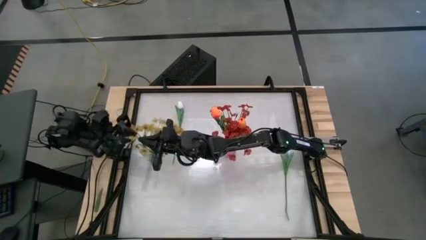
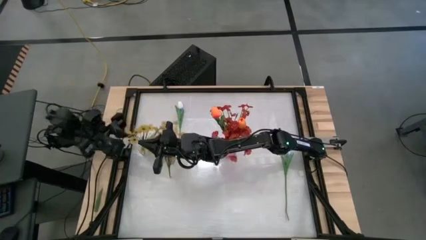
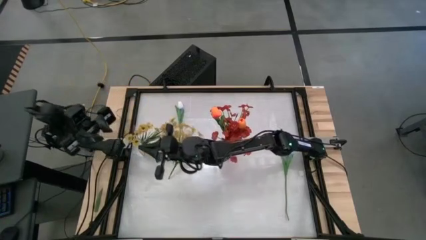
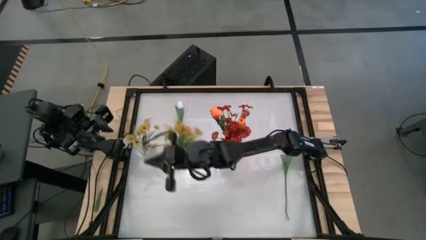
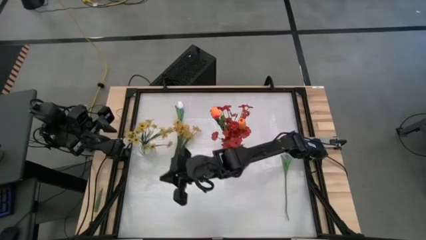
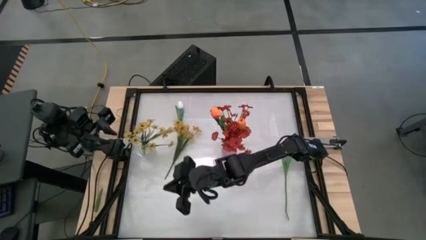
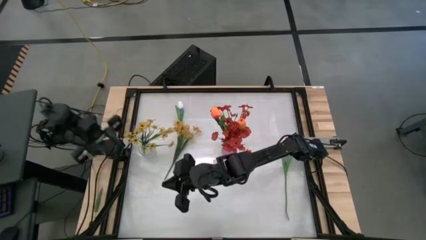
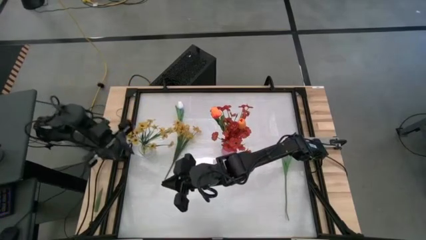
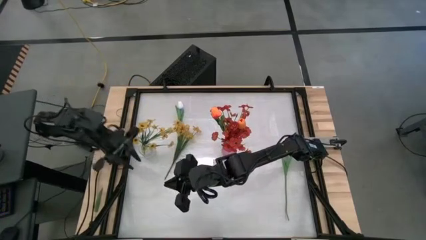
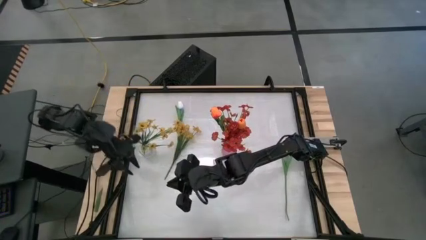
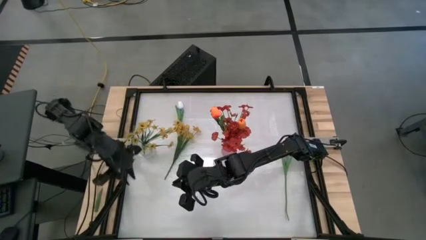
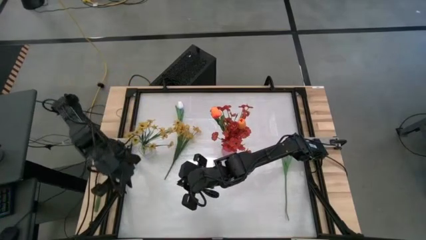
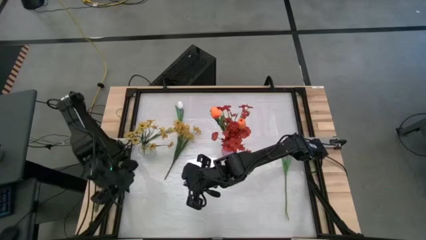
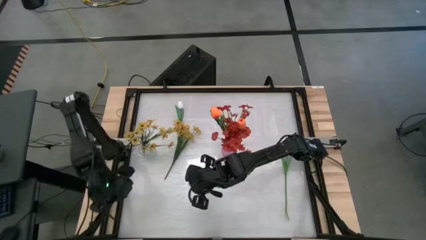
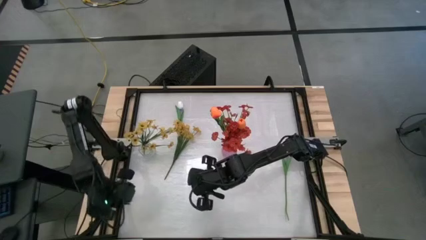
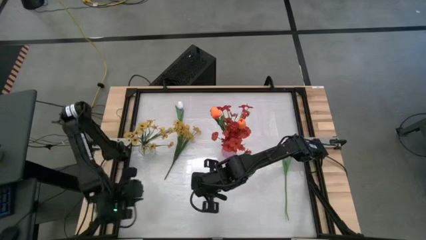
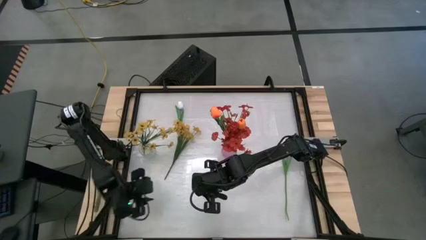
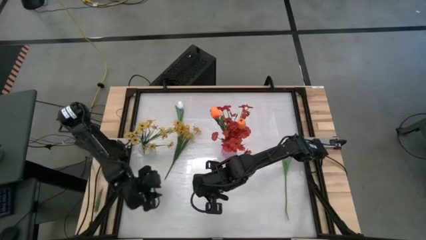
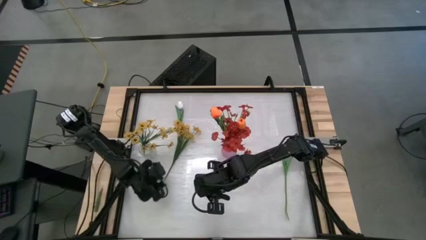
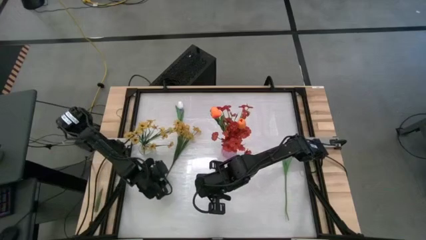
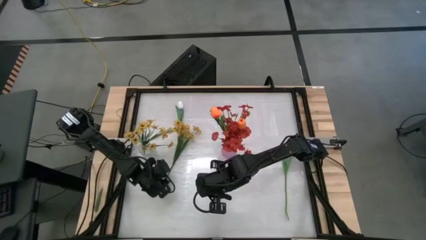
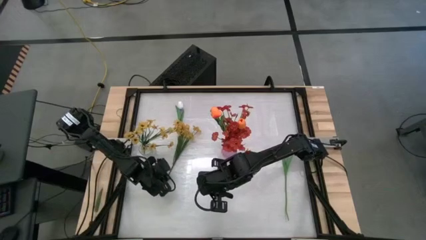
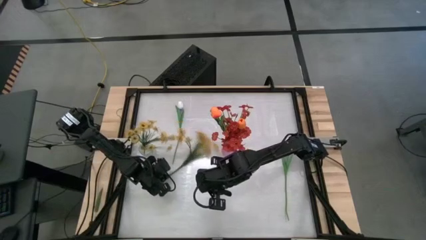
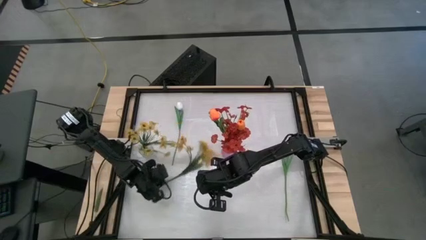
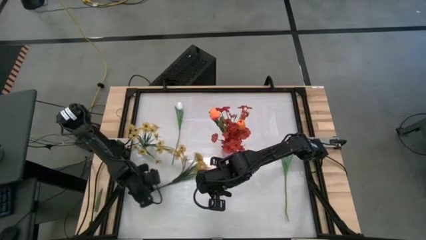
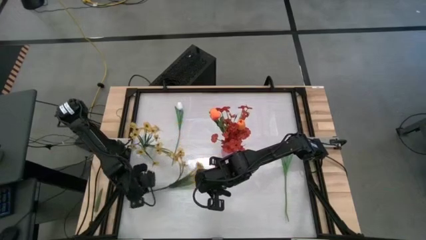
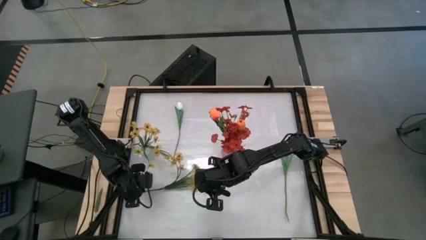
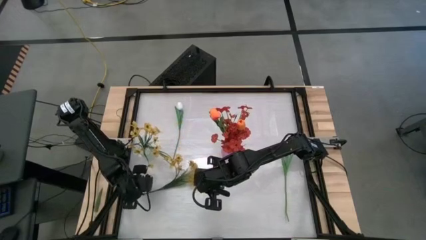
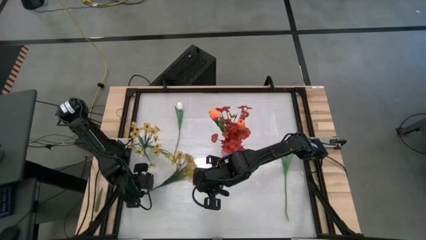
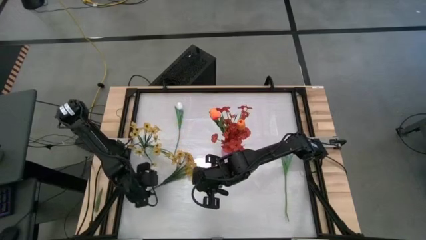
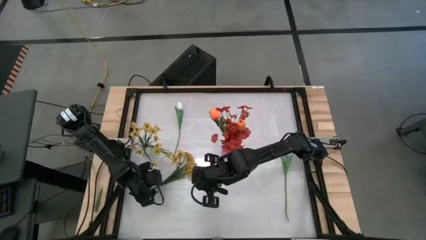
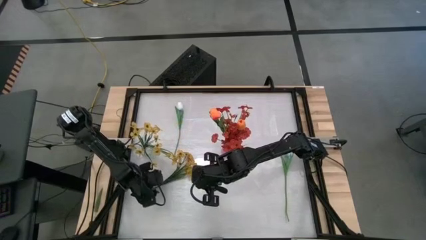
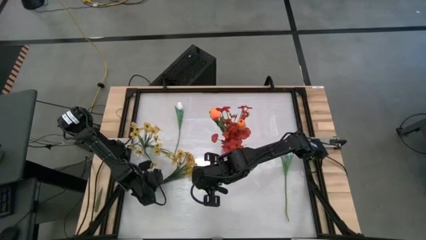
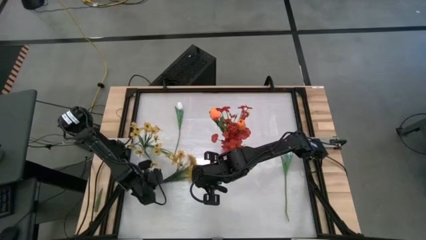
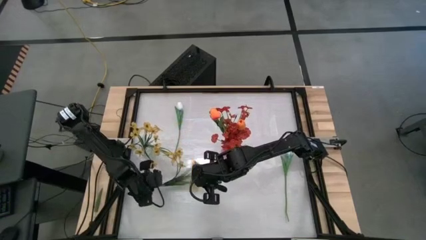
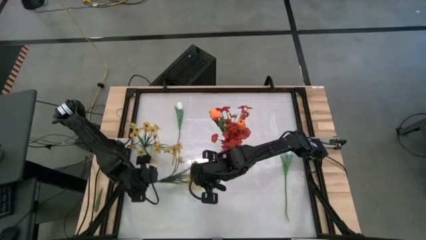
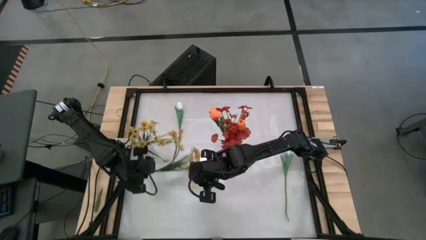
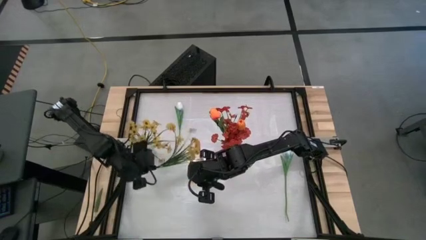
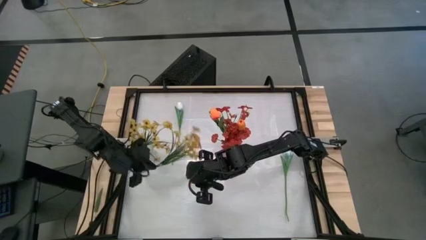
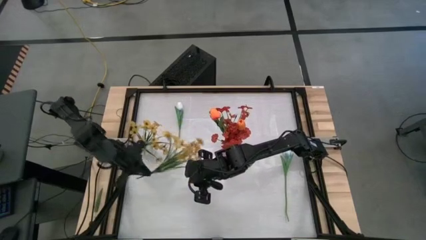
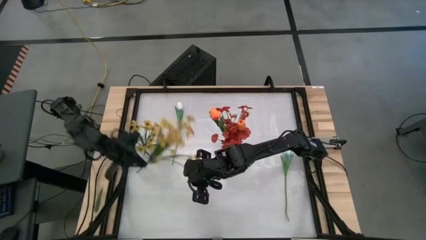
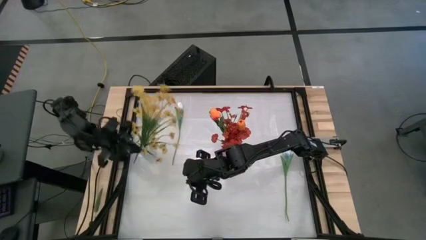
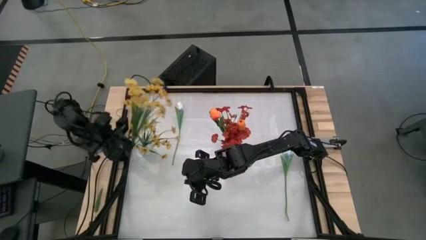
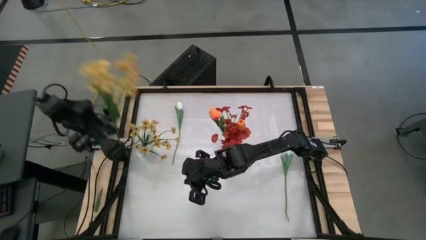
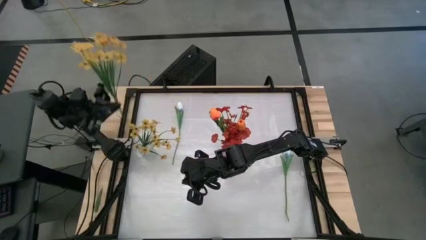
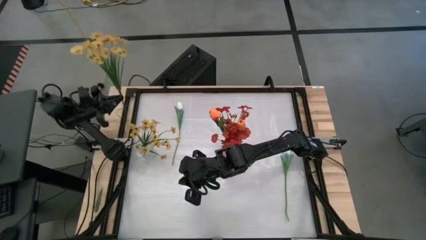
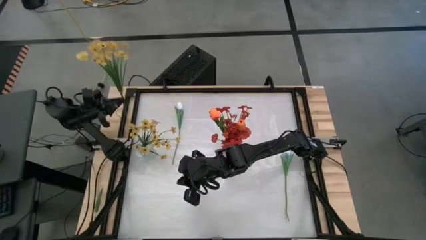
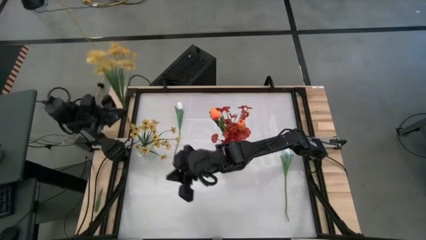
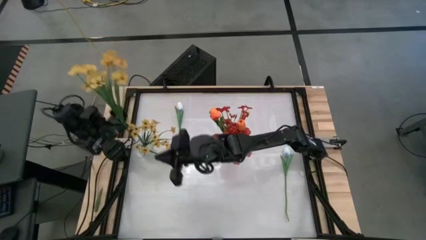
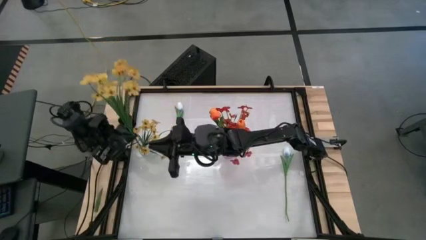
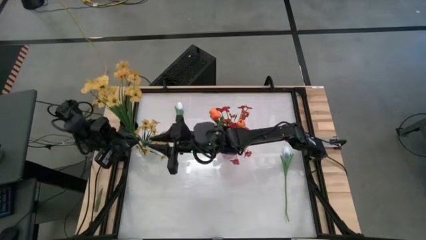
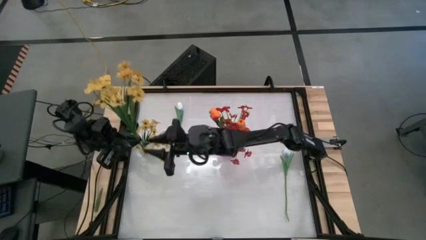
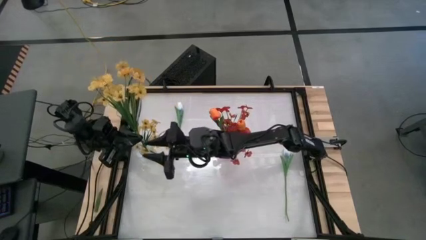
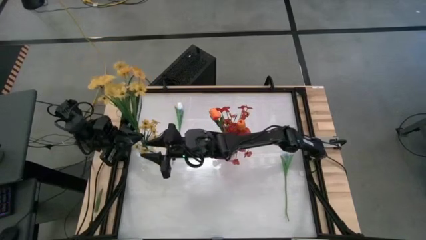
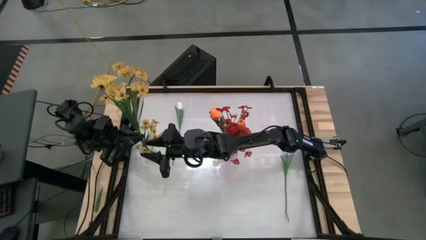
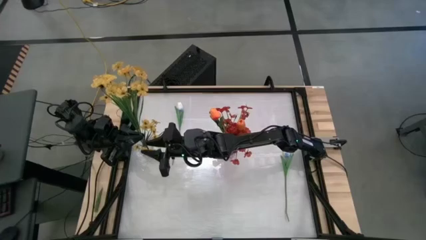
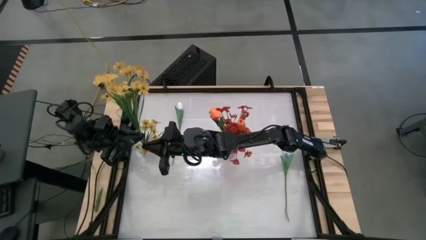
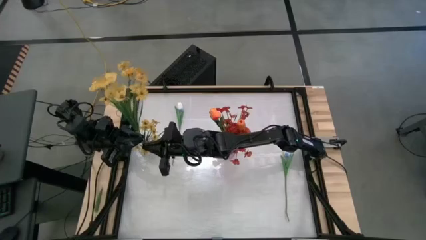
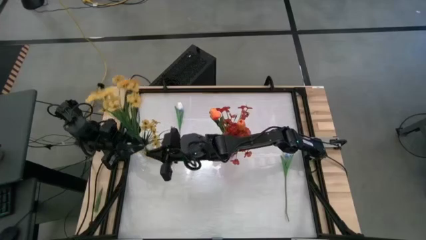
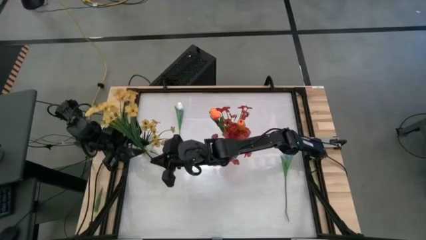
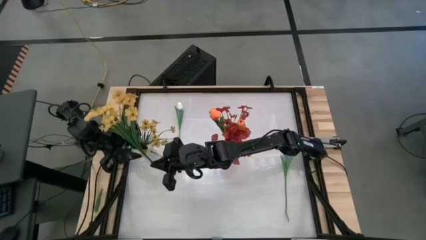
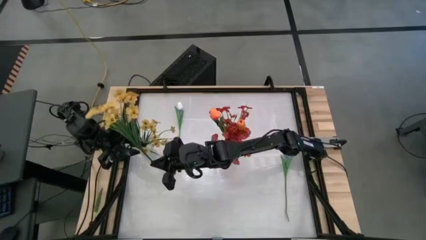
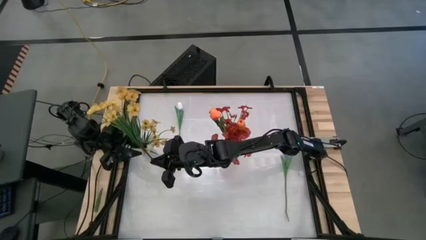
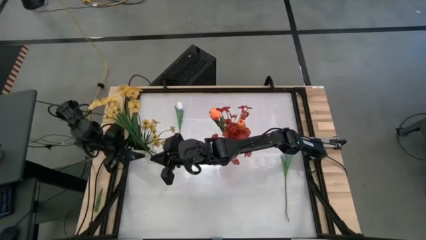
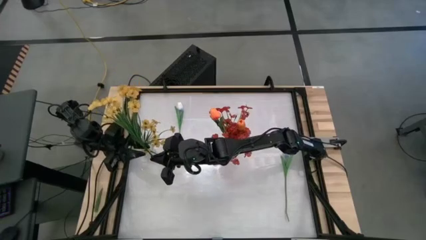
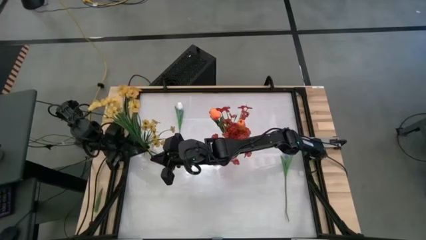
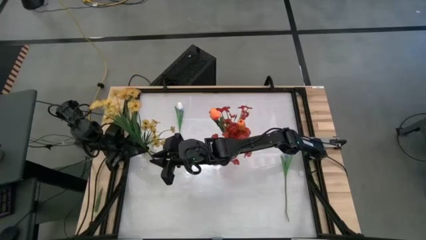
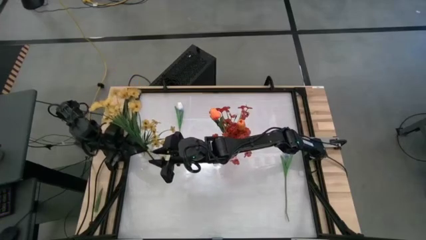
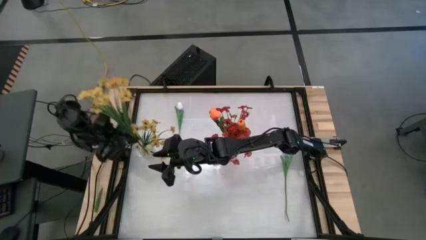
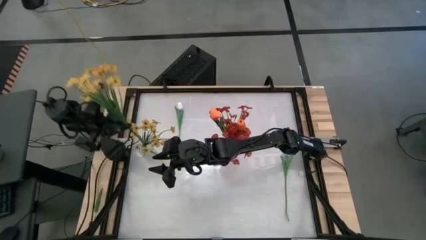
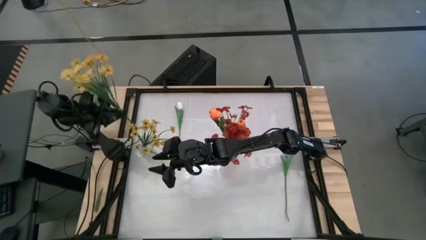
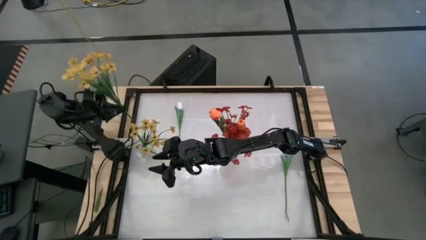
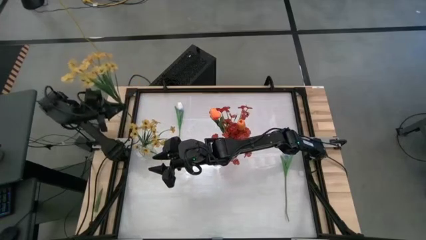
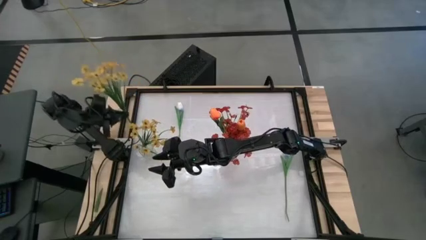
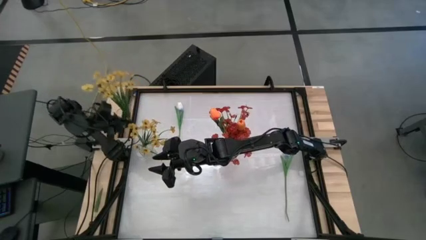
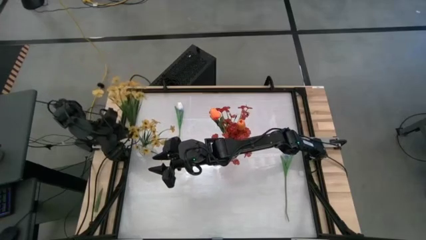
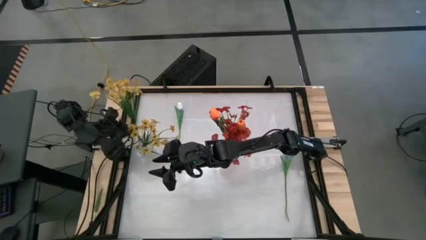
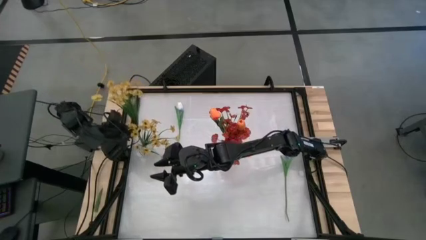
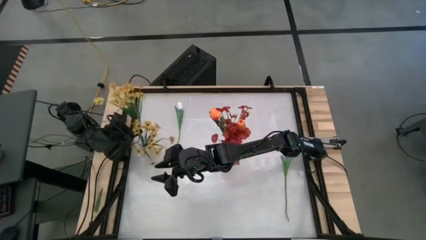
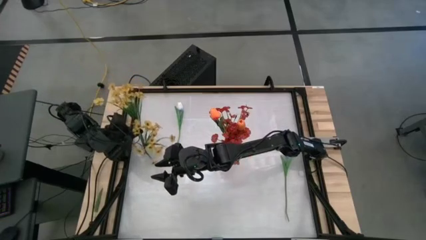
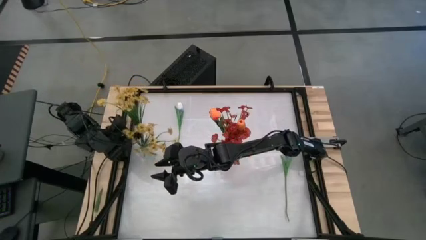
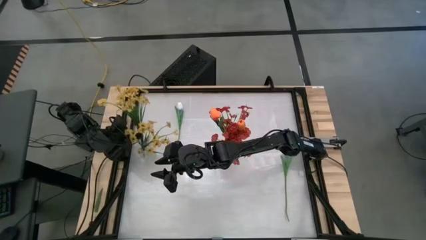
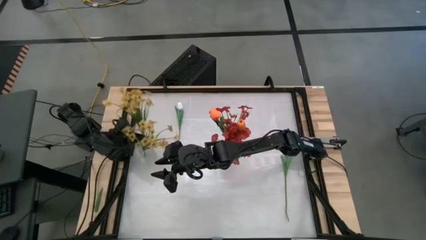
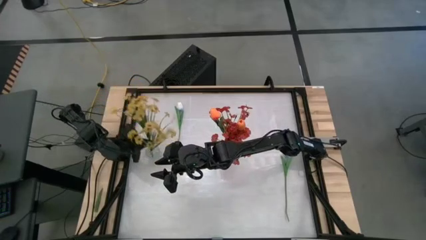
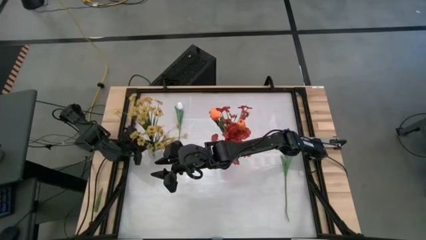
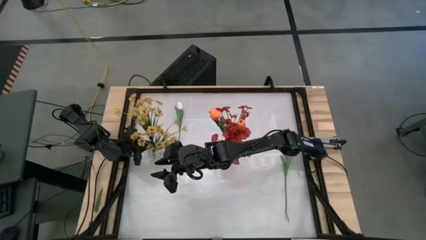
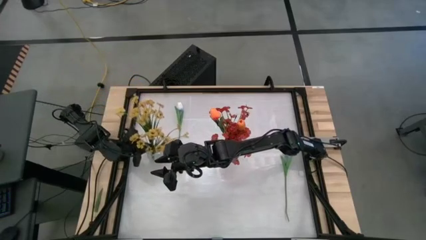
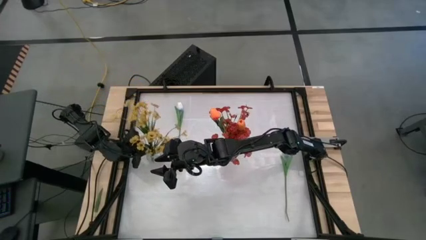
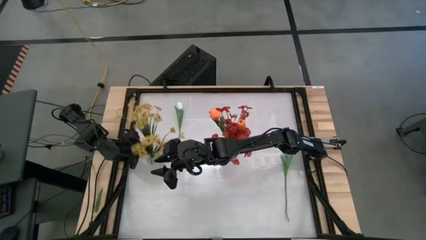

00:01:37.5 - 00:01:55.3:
Task: Sort flowers into vase by color
Put the yellow flowers into the transparent vase
